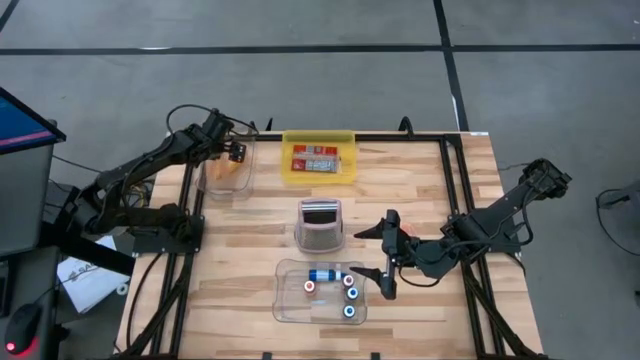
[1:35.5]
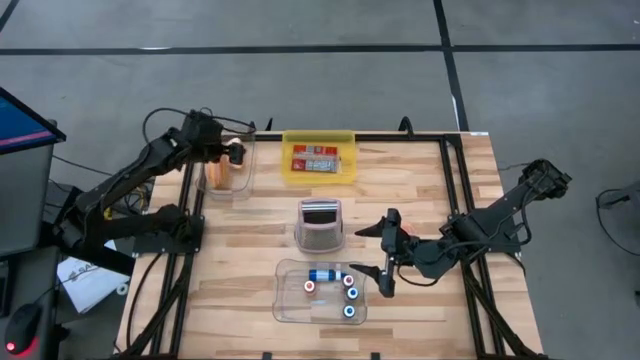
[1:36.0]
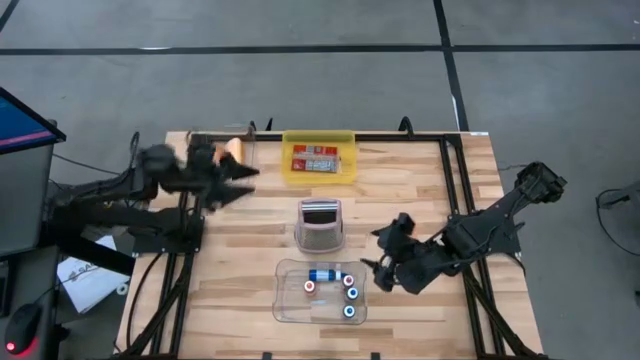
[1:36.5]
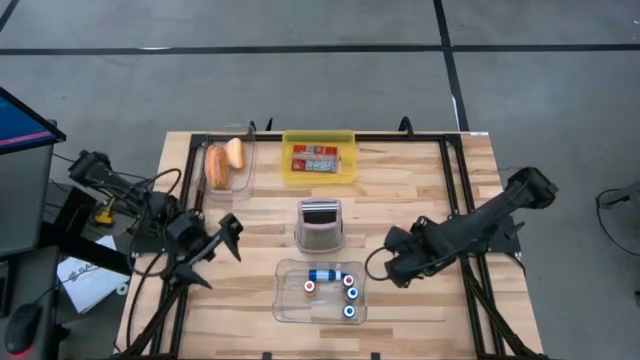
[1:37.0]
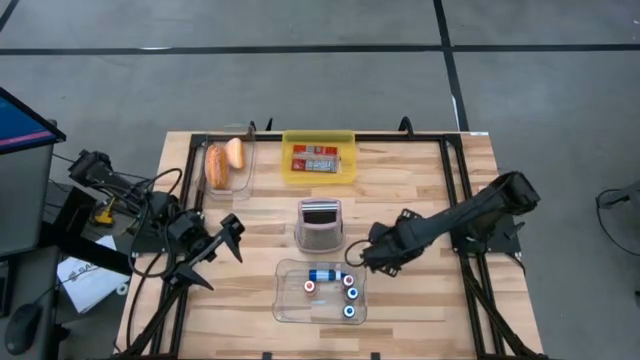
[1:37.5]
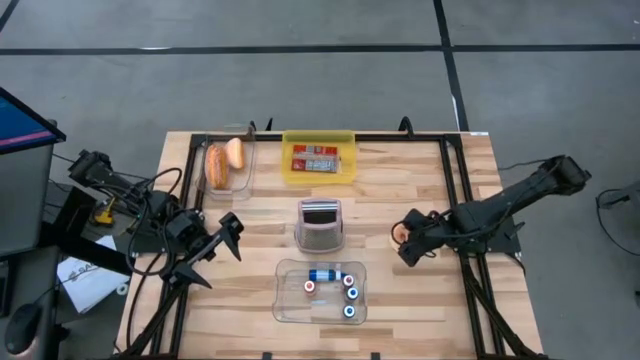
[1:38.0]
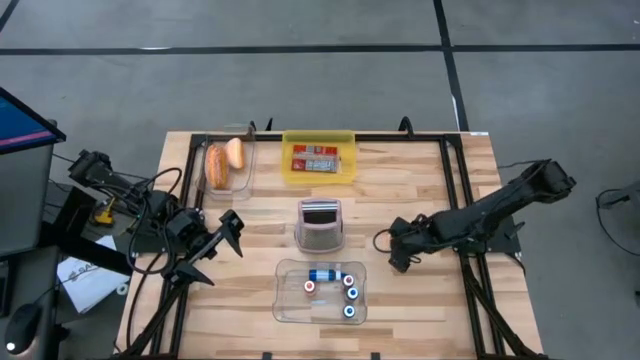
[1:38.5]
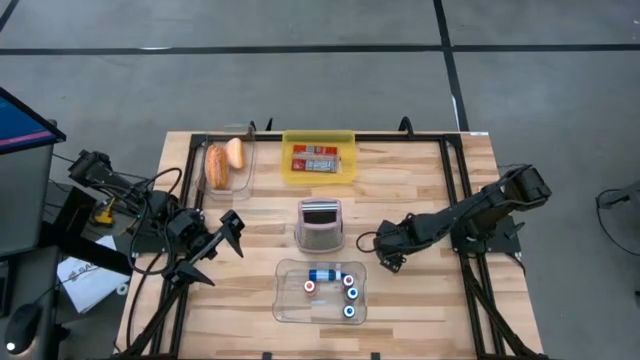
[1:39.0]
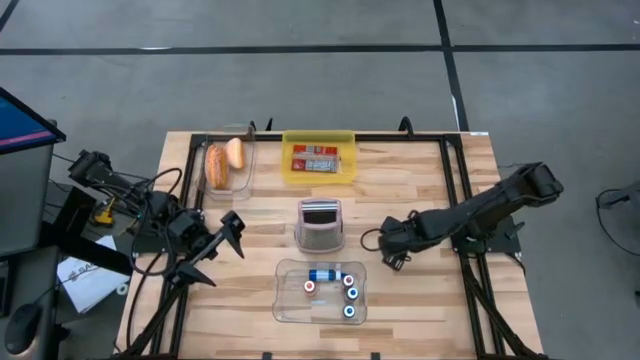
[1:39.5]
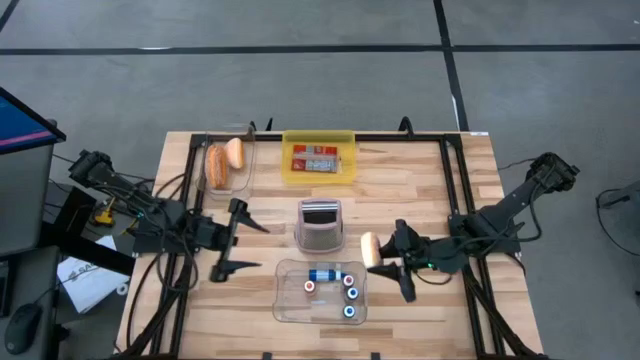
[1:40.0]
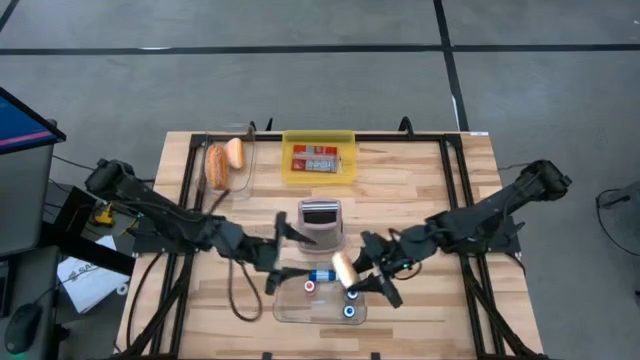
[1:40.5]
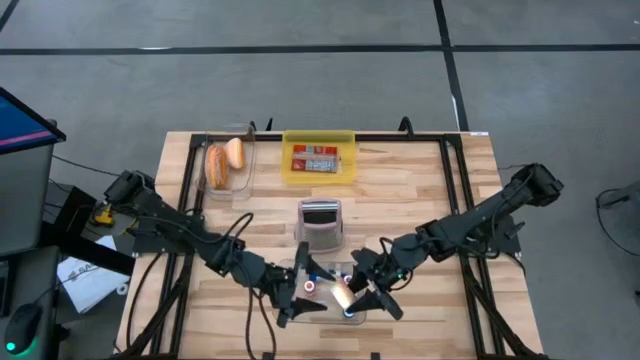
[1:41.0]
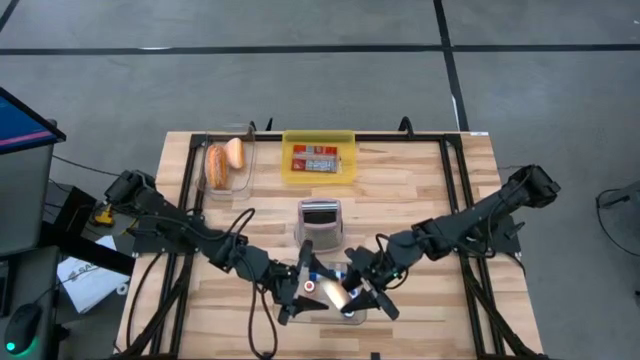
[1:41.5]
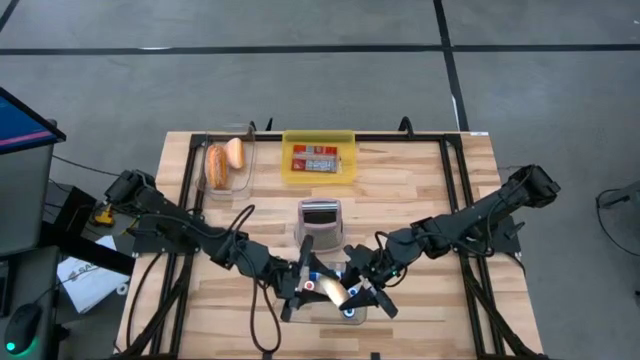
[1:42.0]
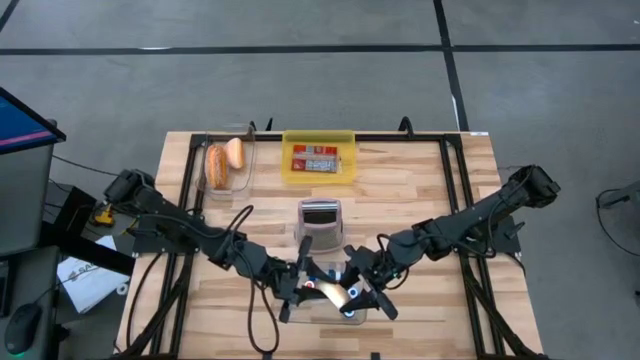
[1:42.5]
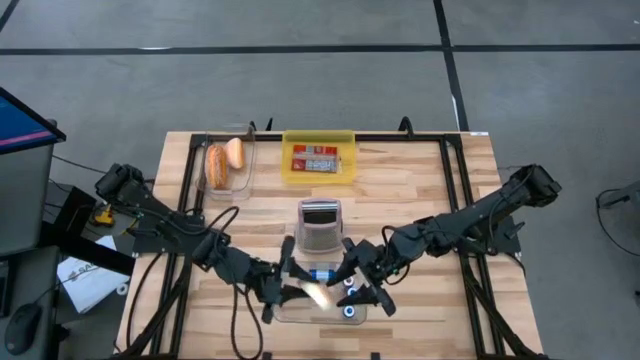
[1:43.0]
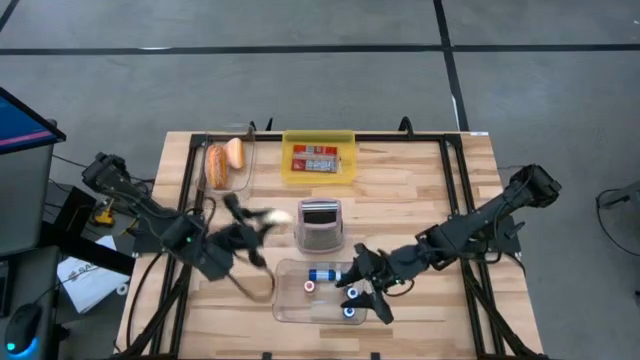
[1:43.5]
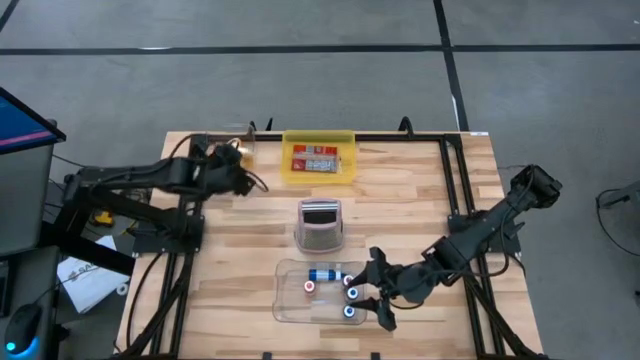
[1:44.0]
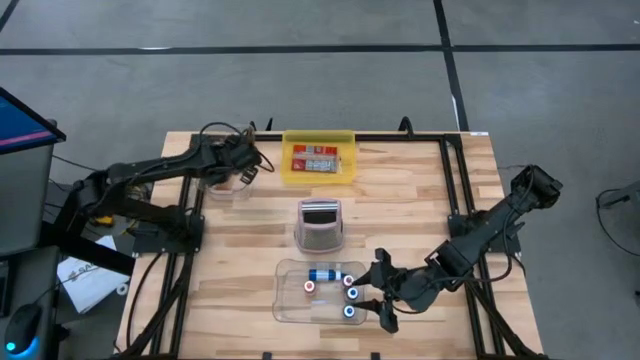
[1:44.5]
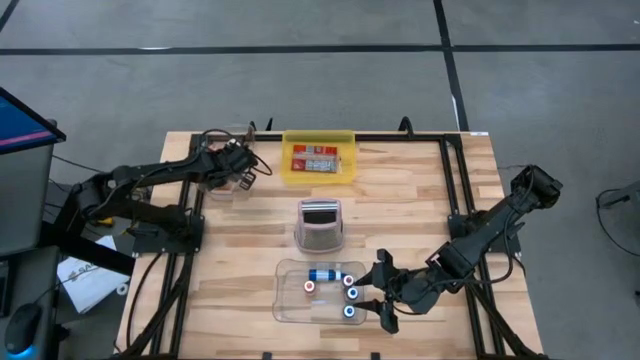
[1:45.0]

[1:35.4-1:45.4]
Put the orange donut into the top transparent bin

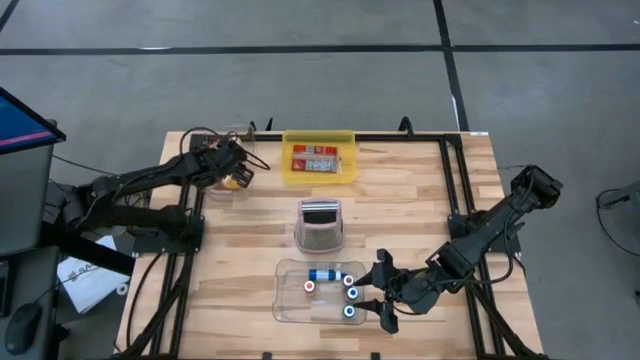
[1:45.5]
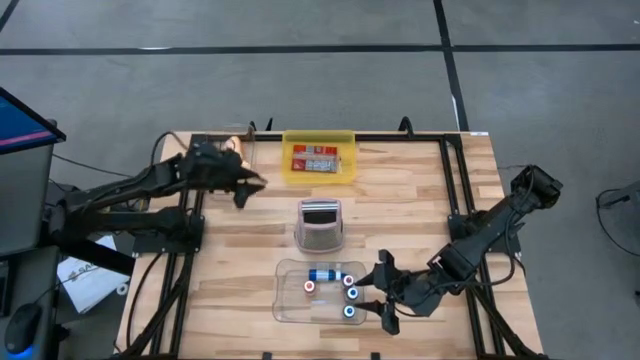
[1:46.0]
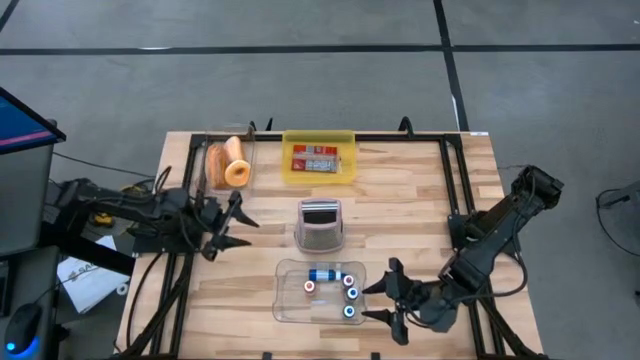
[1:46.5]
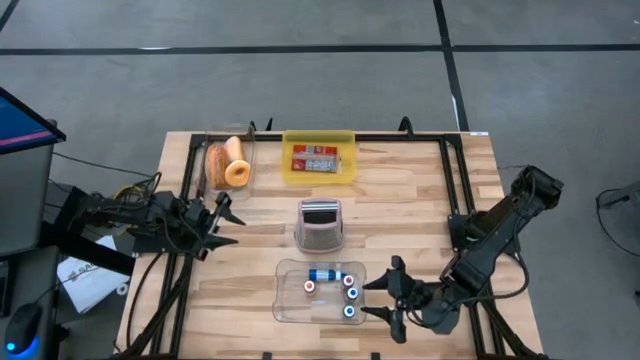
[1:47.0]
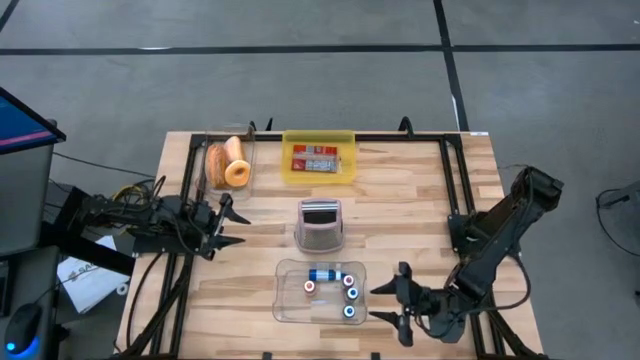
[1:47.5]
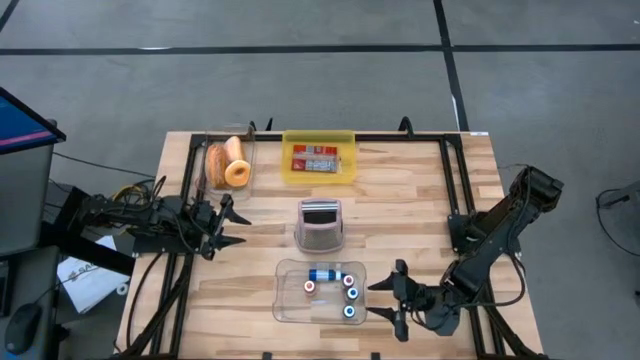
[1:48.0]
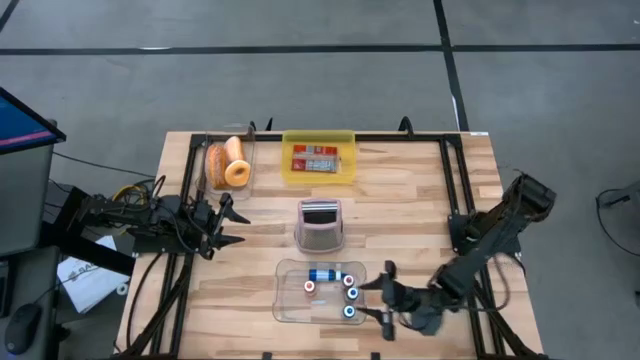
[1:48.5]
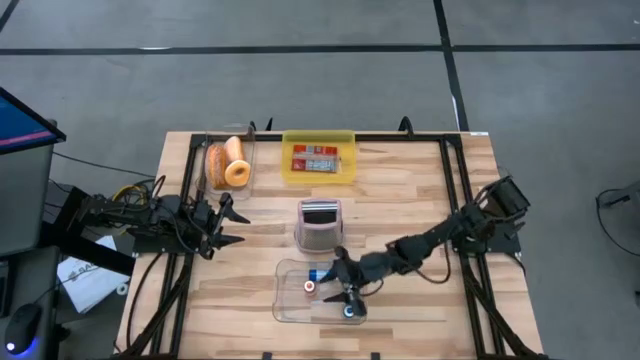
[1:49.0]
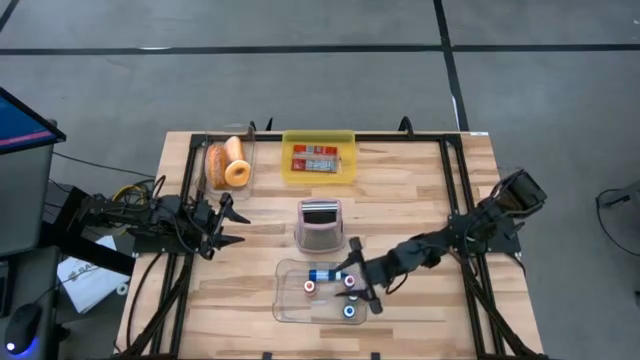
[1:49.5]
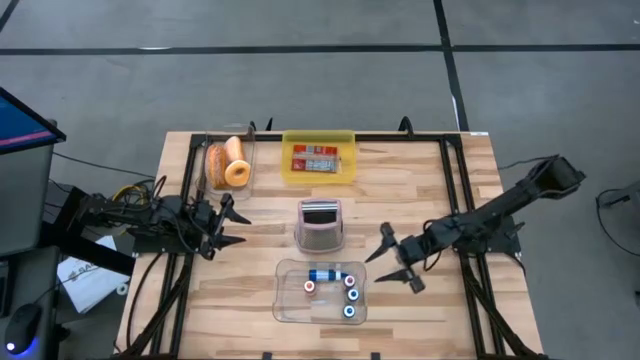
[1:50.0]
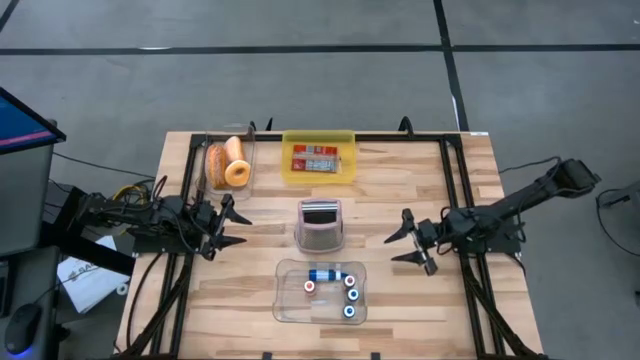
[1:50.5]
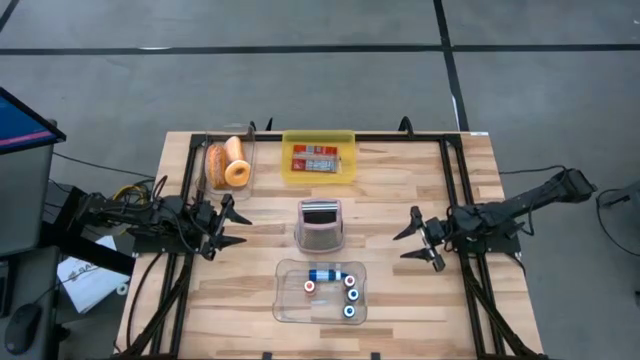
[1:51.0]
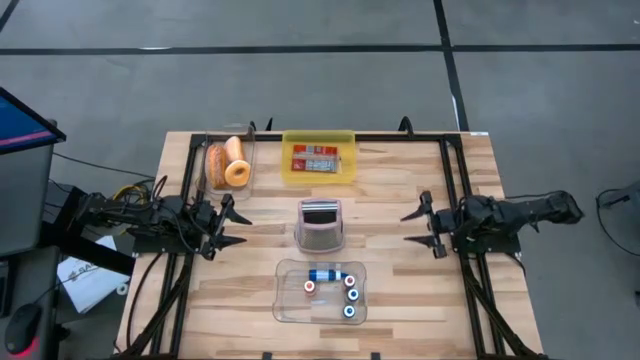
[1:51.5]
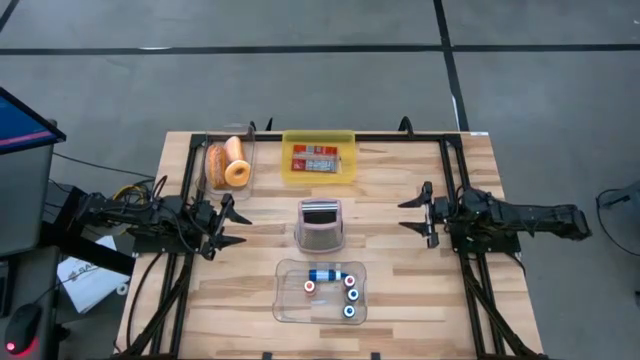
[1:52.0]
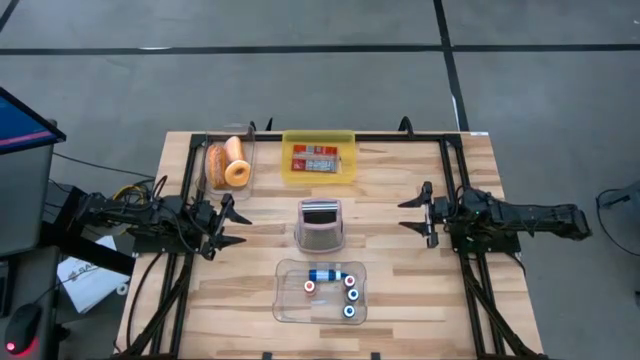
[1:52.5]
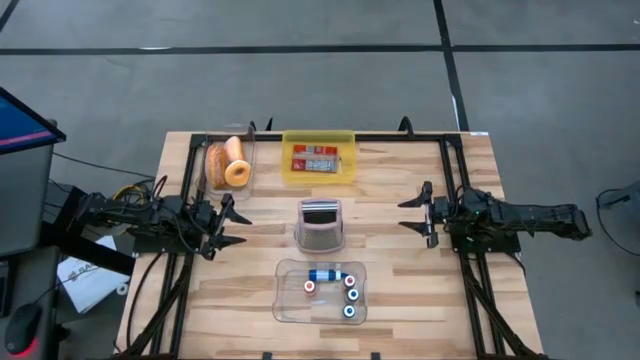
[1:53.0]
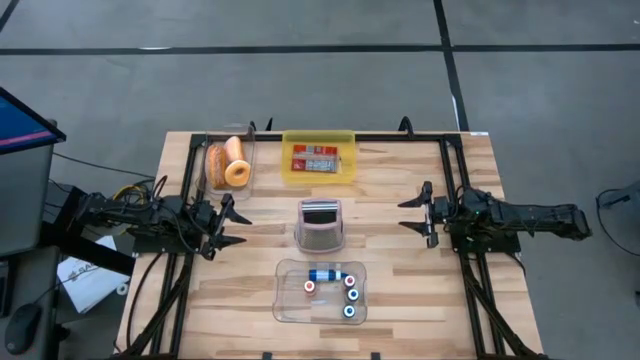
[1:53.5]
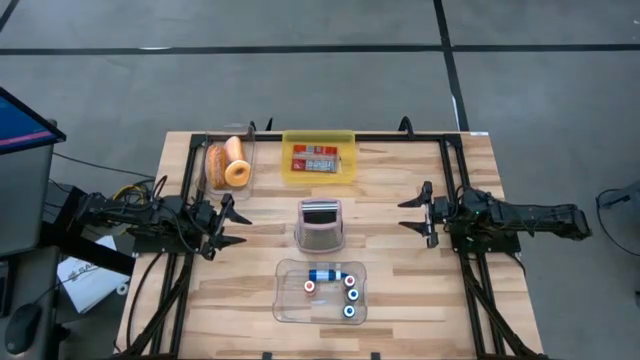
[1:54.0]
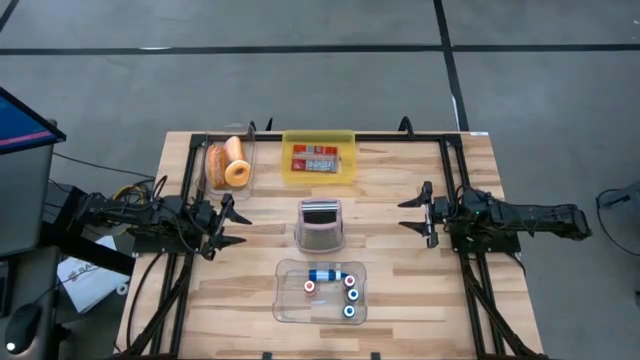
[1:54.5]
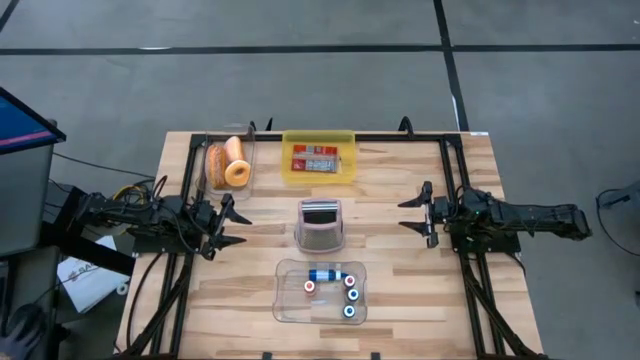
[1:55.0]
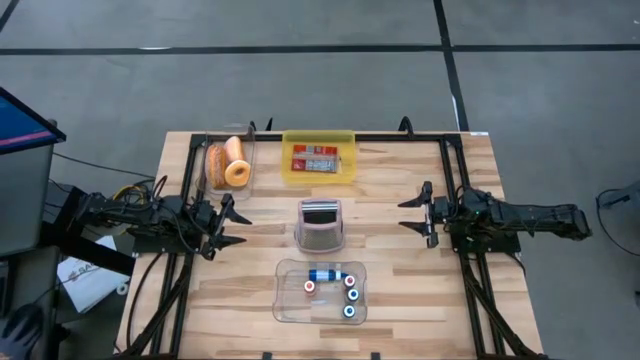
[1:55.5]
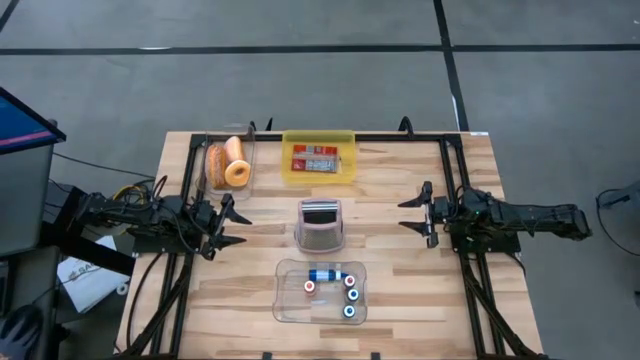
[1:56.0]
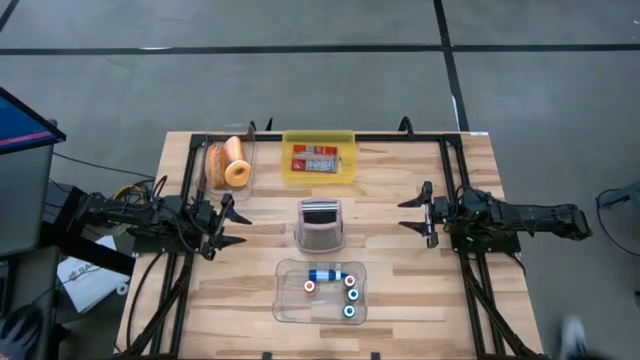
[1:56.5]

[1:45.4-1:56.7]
Return to Home Position
